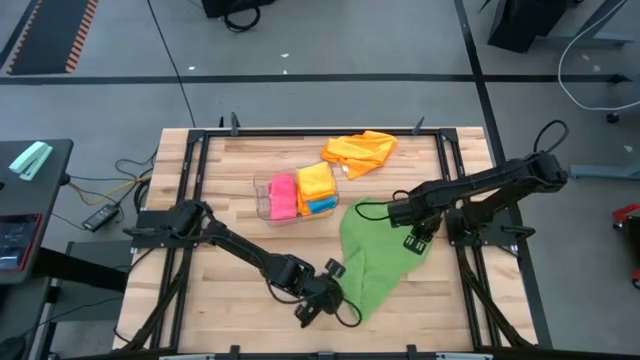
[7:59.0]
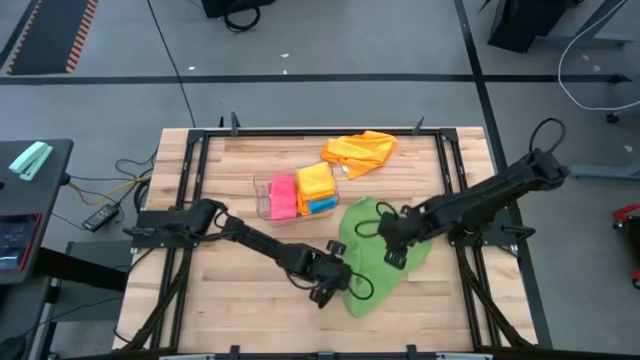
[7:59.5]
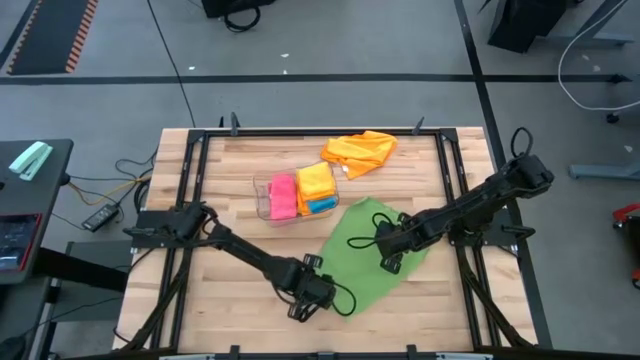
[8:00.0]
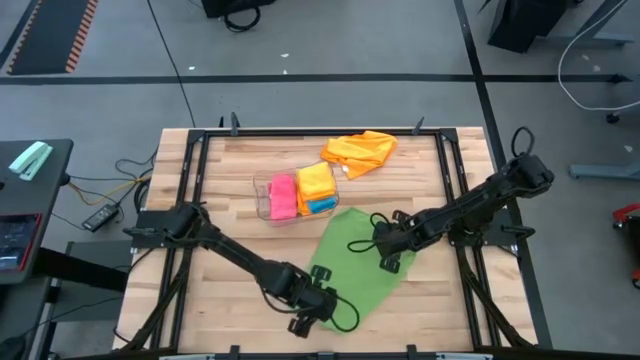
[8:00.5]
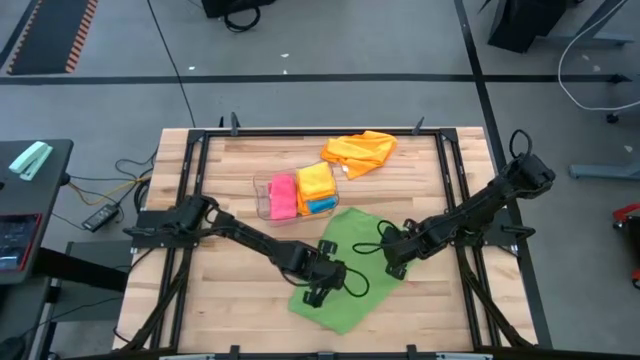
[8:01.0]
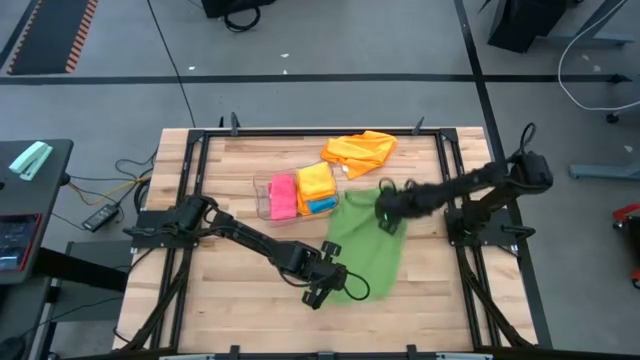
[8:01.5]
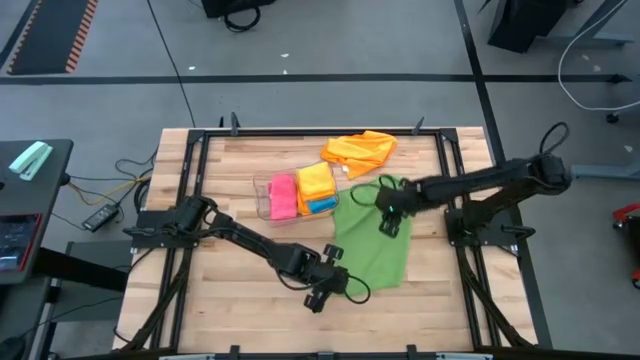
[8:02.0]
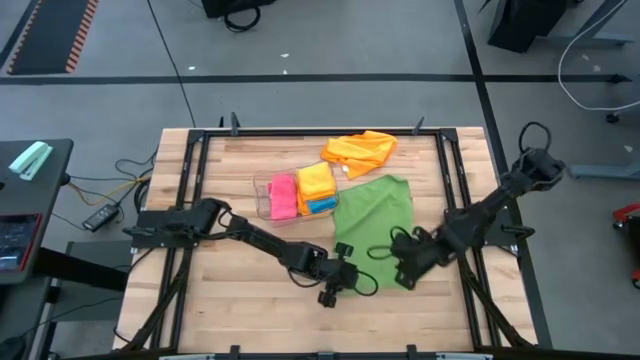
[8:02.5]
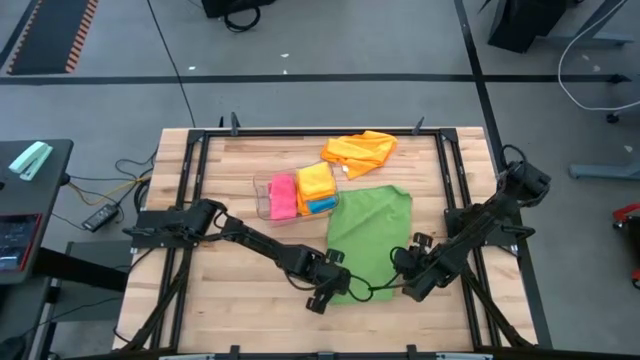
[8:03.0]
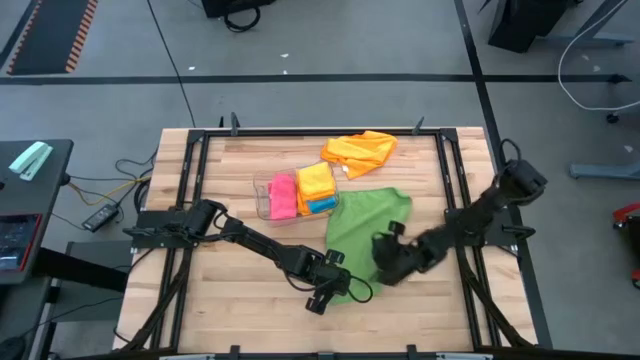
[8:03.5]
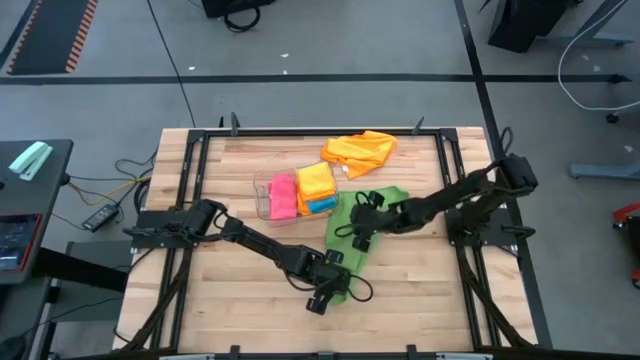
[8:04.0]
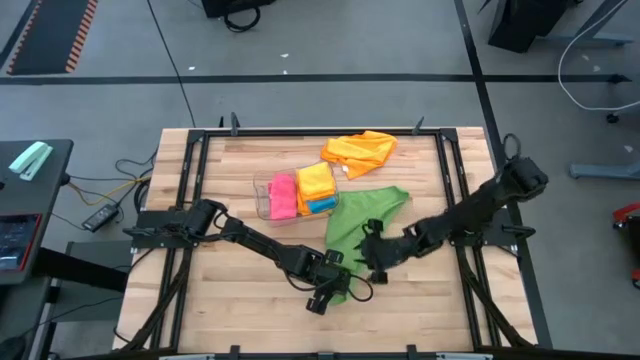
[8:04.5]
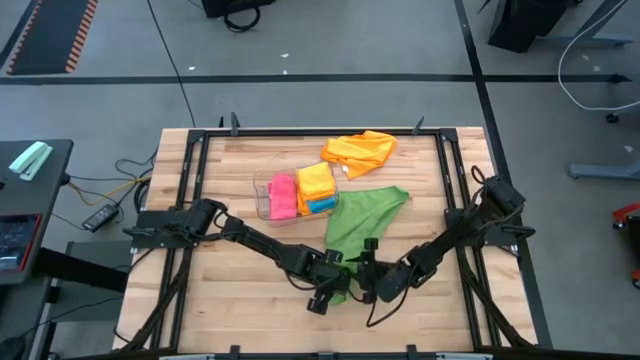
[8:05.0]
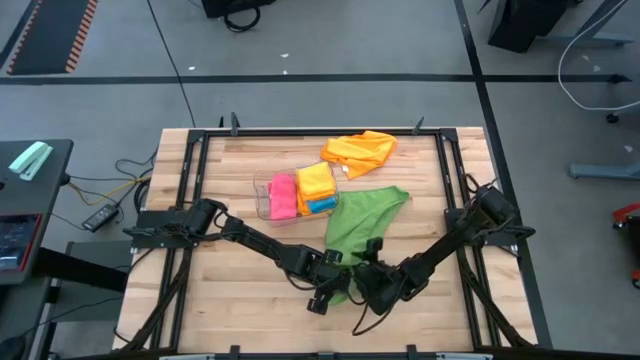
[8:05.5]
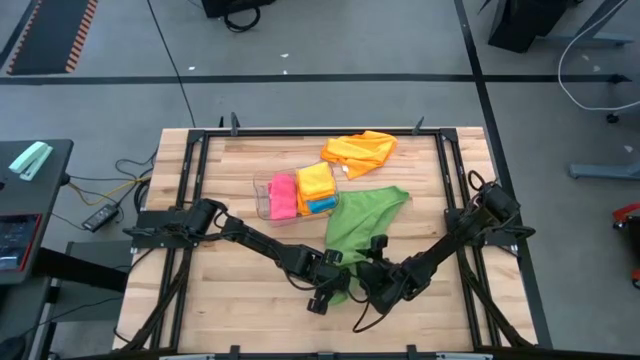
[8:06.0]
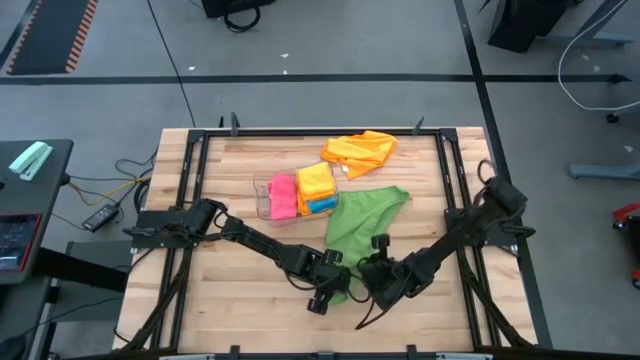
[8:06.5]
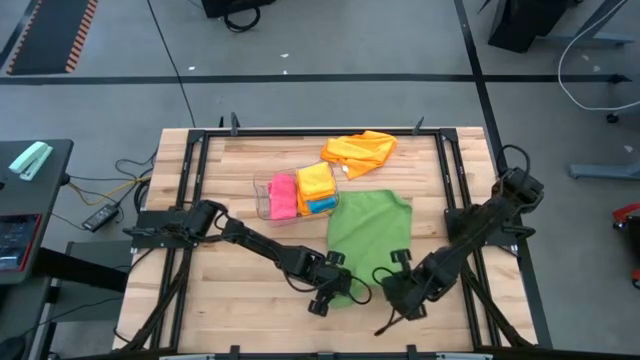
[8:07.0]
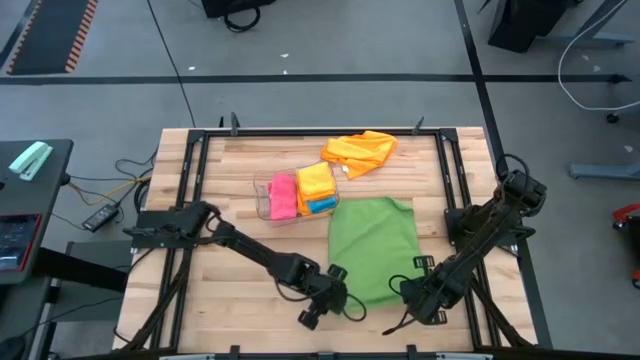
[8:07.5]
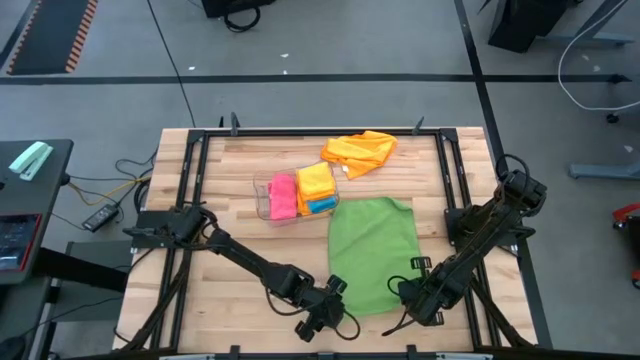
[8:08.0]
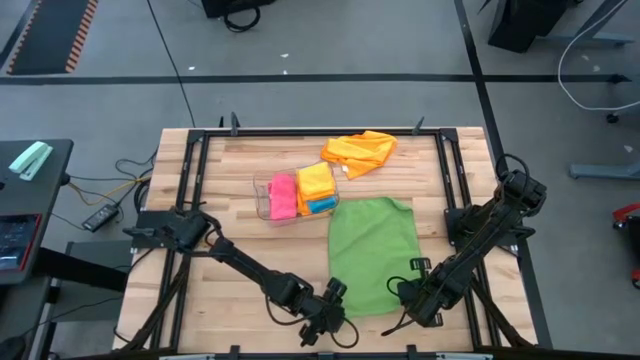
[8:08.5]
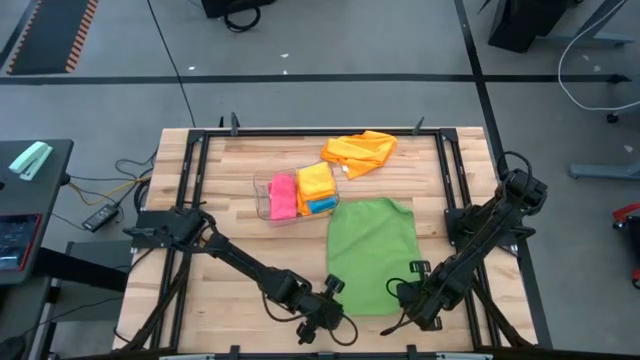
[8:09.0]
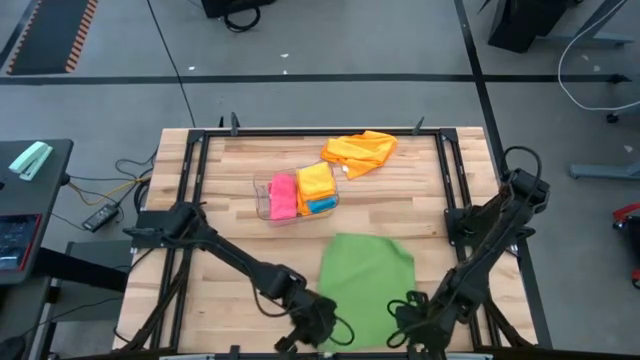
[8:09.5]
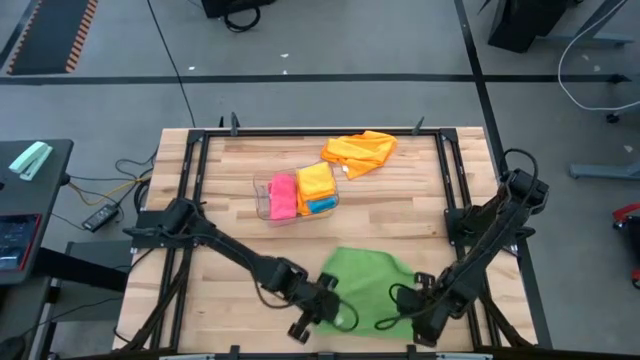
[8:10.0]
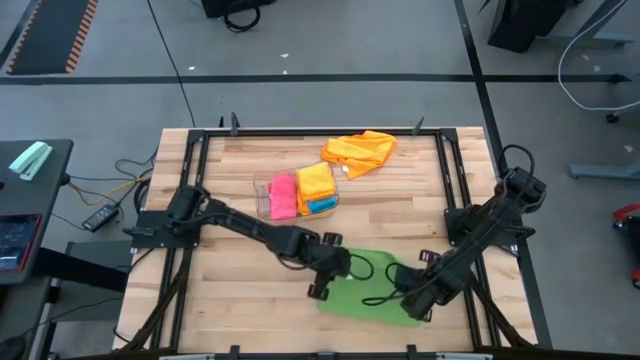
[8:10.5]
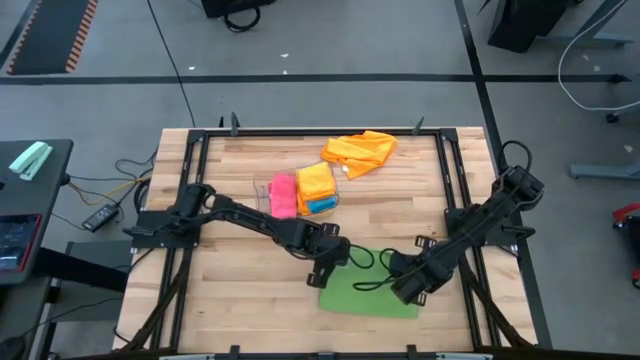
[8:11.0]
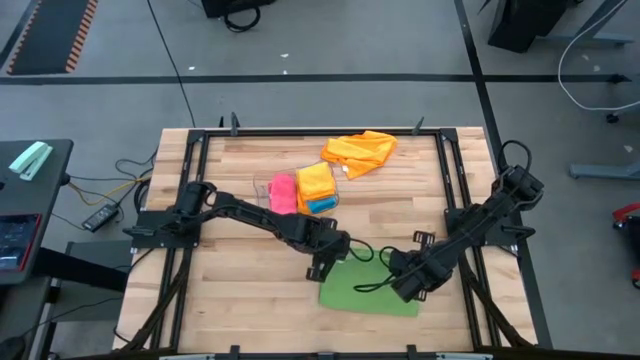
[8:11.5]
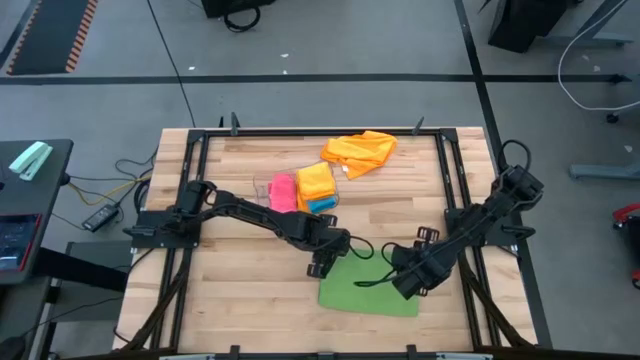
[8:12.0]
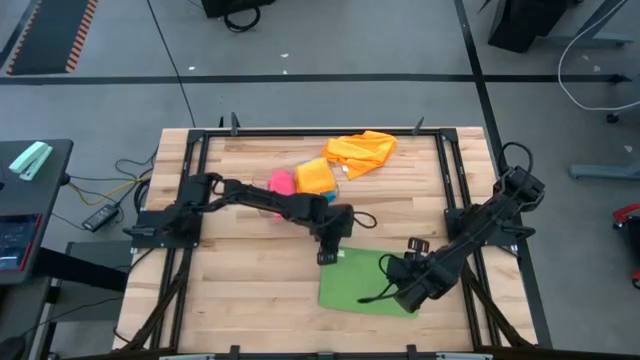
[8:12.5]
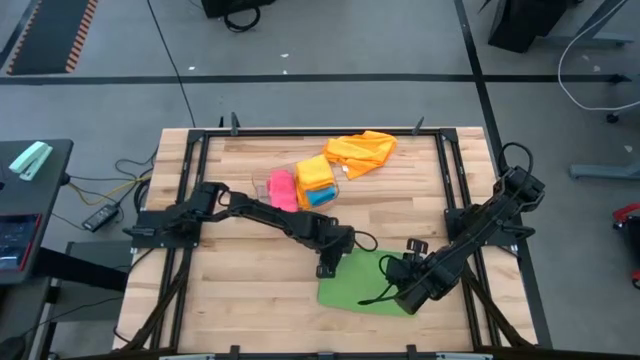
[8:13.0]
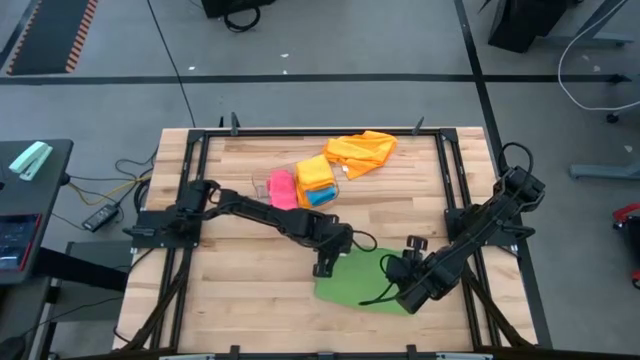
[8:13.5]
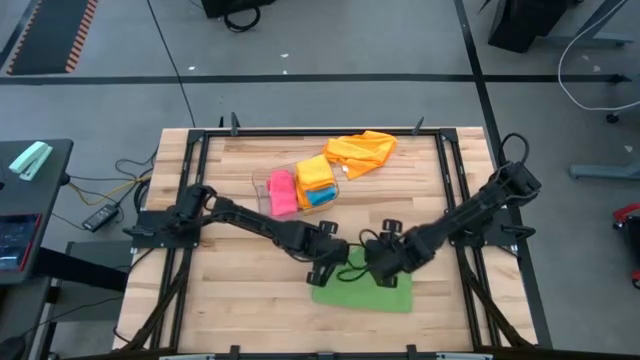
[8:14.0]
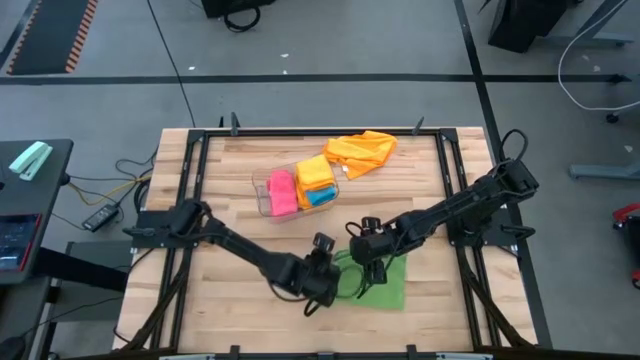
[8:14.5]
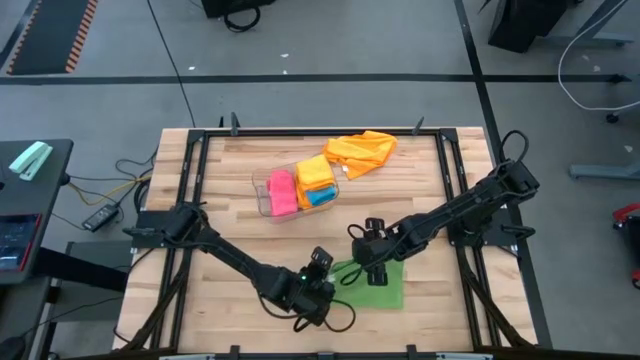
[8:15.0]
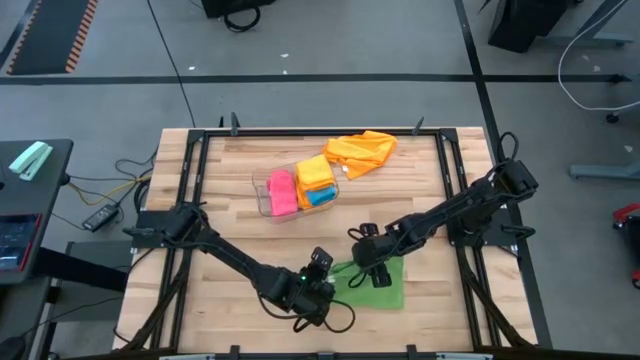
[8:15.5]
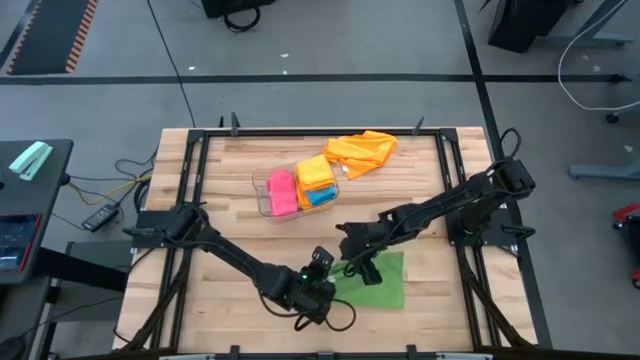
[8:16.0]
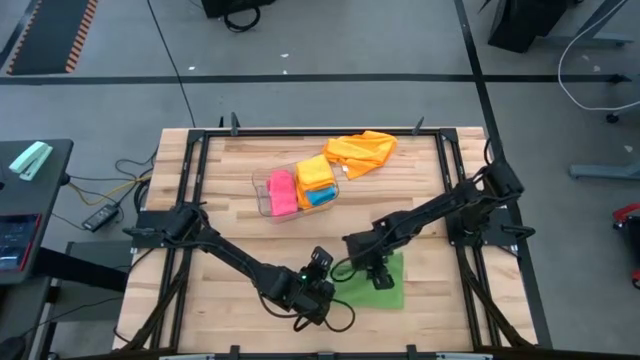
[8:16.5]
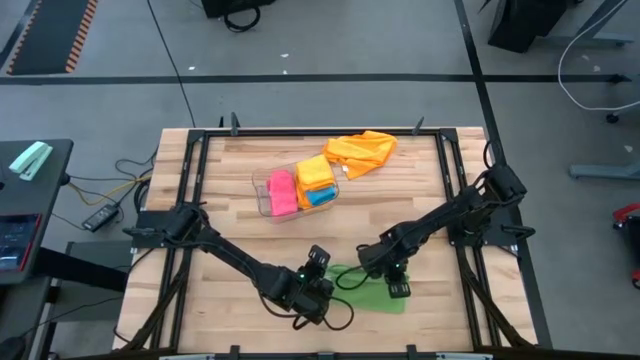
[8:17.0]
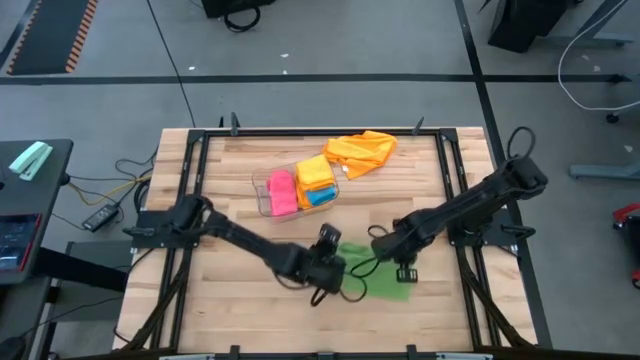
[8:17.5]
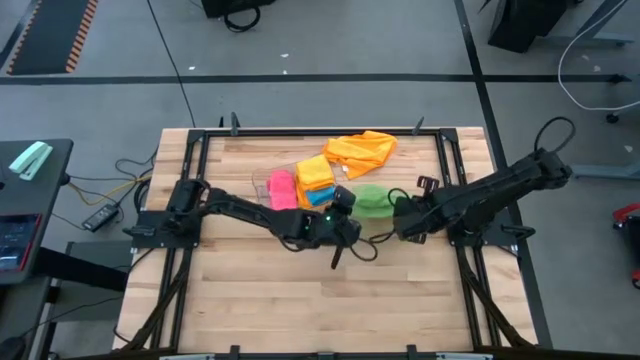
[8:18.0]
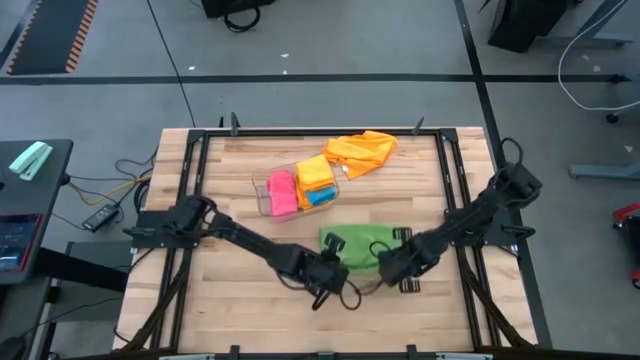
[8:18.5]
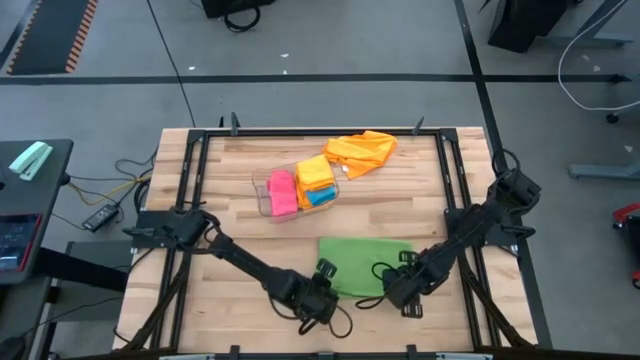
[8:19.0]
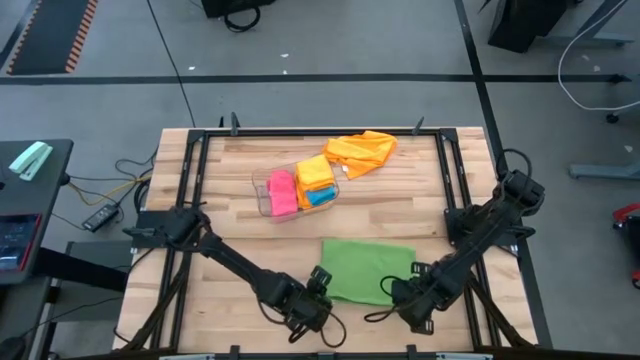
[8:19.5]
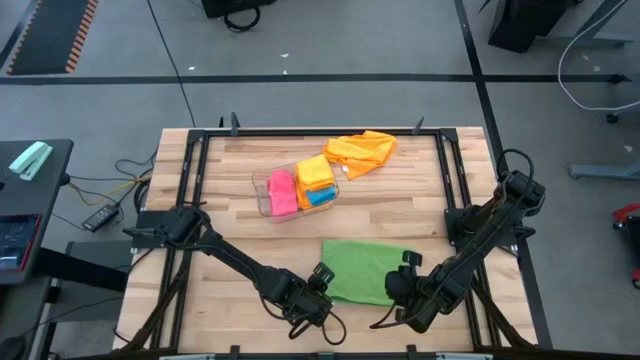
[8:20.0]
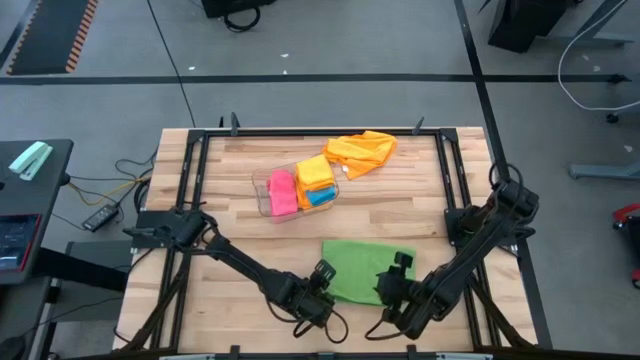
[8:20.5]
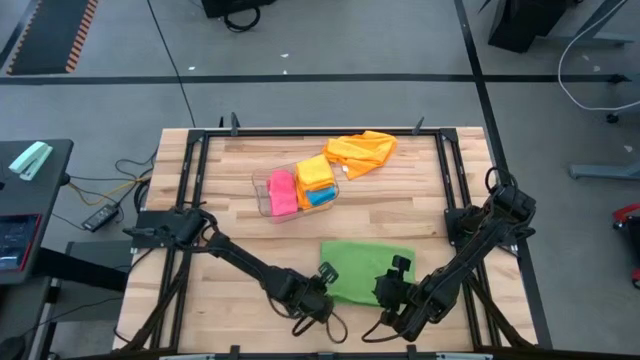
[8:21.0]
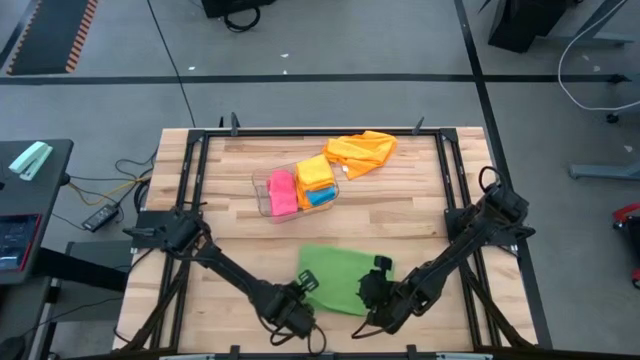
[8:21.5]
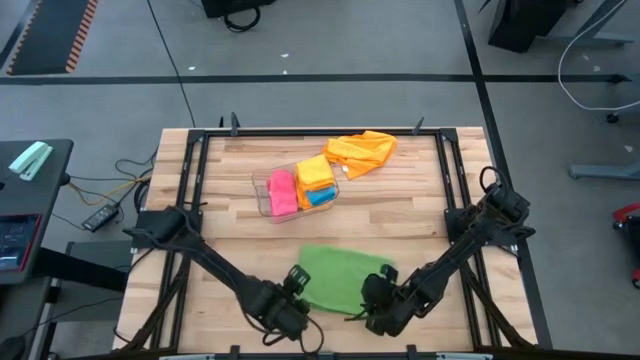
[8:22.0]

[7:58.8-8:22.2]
Task: Fold microfiber towels
Fold the green microfiber cloth
